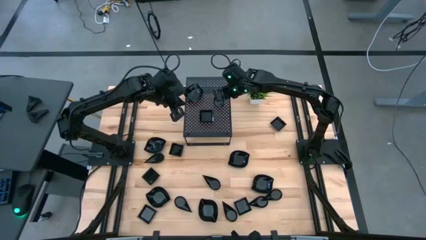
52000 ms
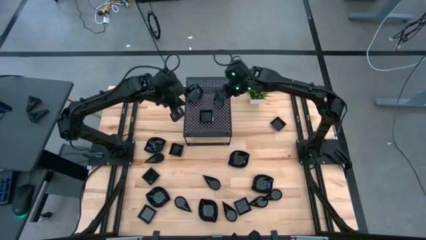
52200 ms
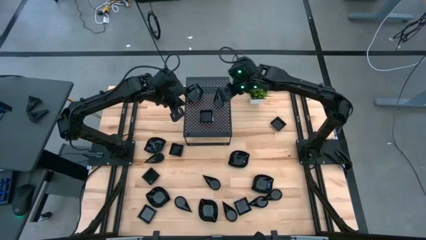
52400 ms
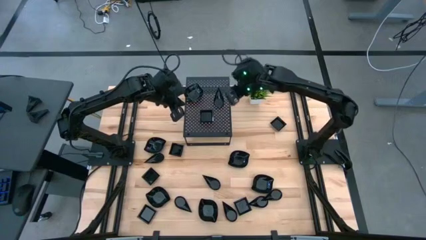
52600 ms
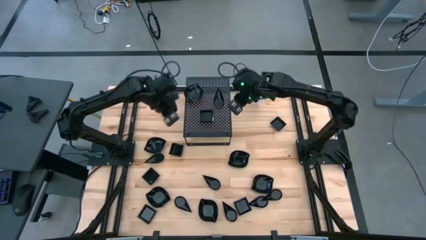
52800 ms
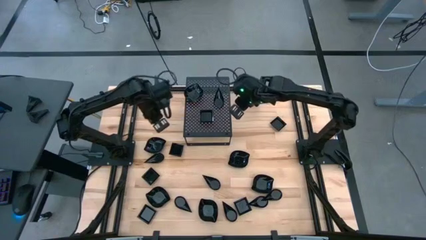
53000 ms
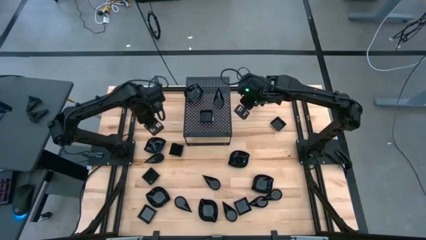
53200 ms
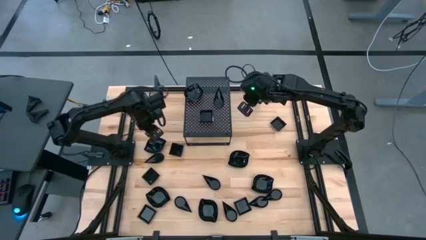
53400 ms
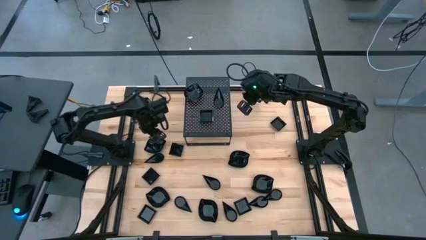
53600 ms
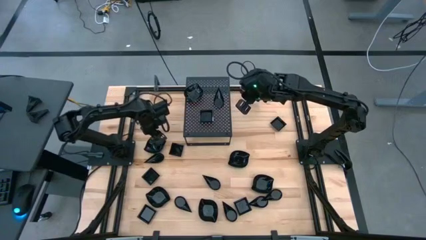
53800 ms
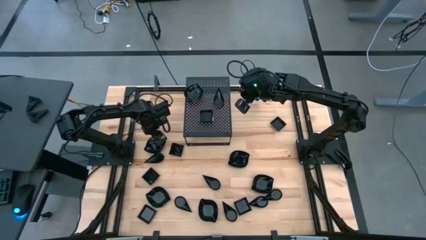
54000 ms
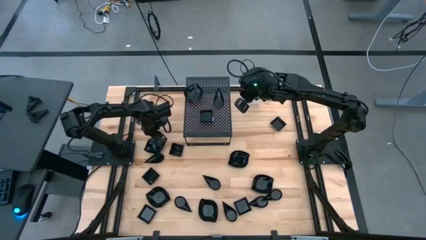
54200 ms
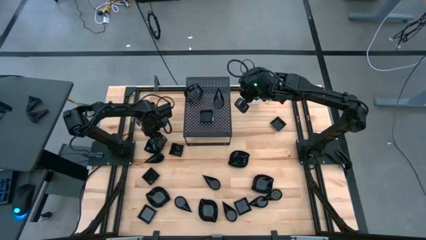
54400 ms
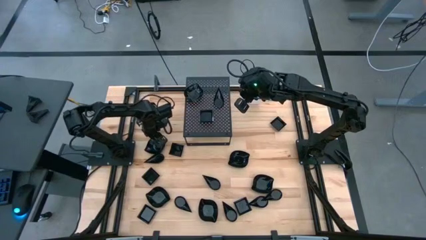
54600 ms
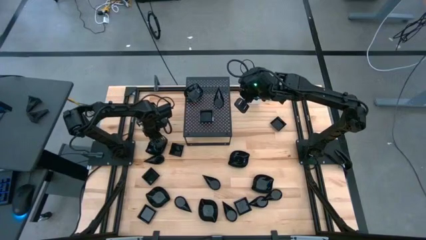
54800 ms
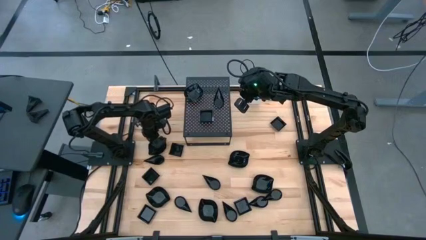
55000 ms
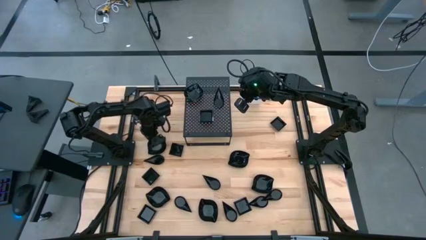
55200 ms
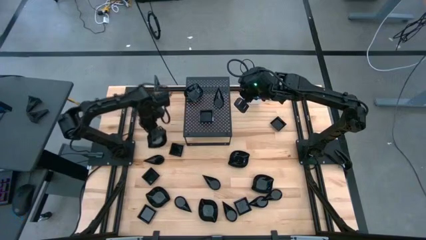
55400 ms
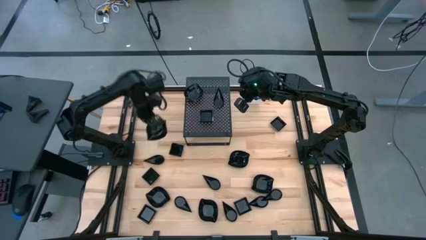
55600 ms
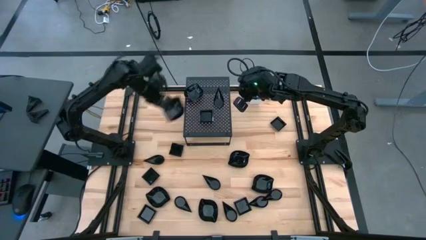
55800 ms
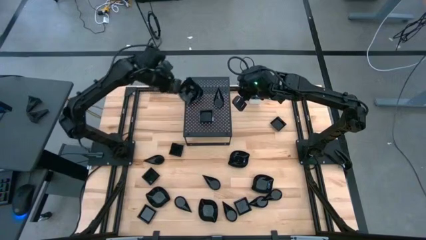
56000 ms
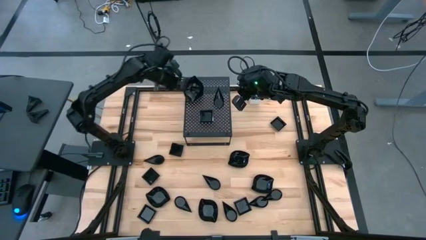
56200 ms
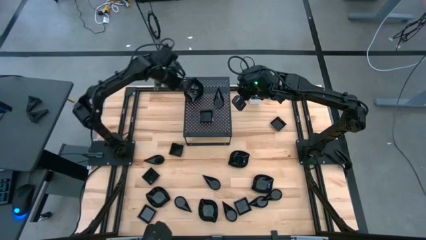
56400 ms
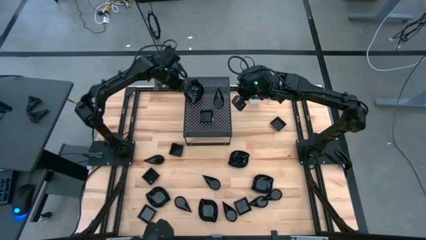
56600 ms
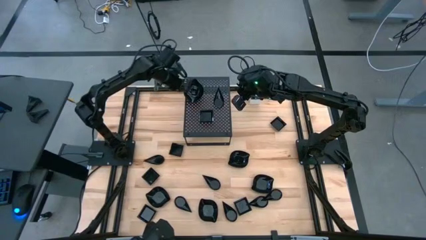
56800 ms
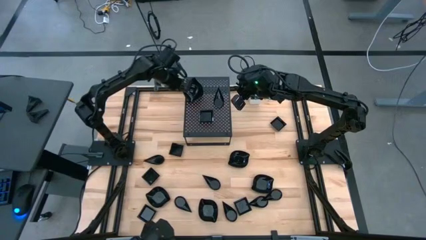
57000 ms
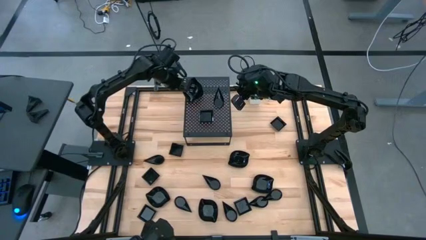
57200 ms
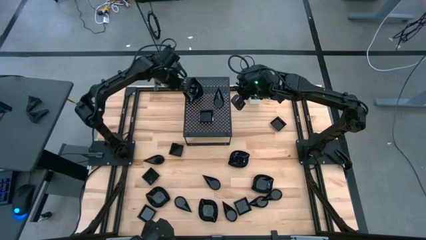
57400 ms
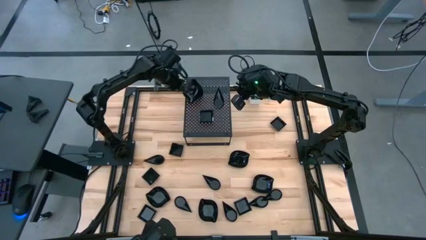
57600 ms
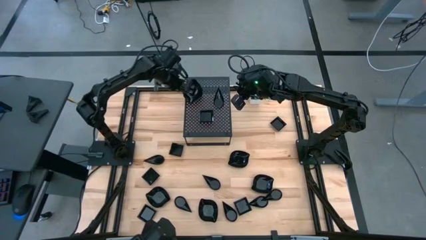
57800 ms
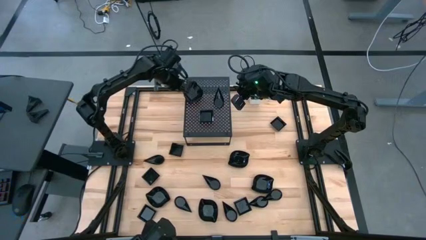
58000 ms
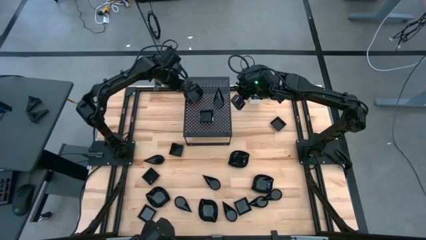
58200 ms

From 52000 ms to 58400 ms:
Task: Pick & Place Mini shaped plates
Stack the leaf shaped plate on top of the leaf shaped plate on the shelf

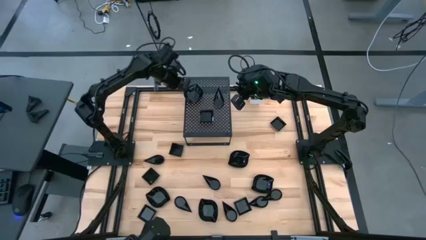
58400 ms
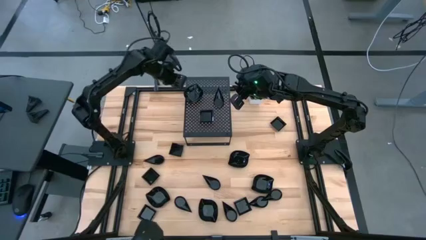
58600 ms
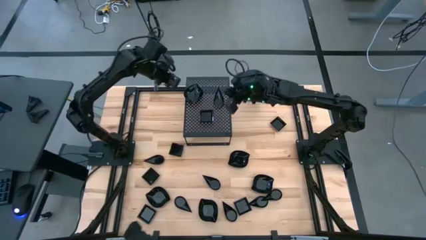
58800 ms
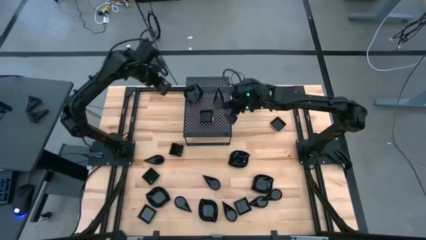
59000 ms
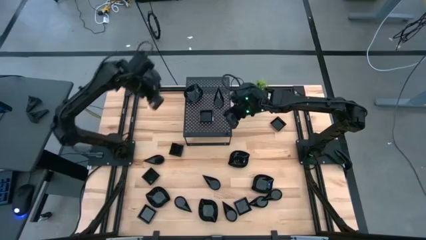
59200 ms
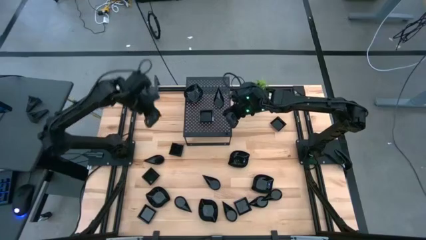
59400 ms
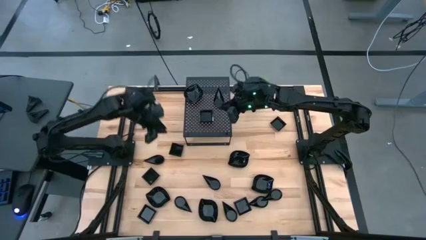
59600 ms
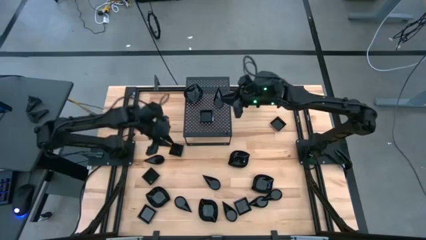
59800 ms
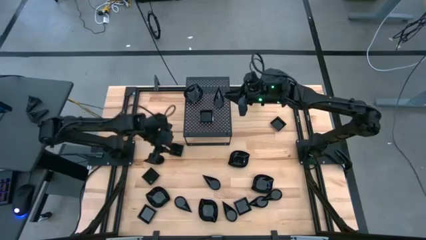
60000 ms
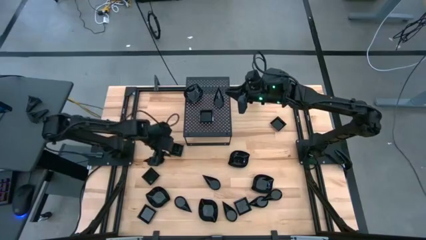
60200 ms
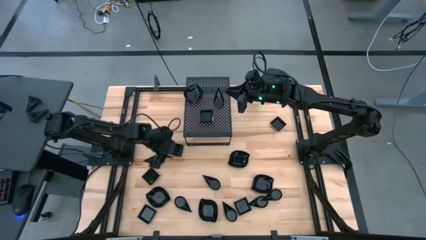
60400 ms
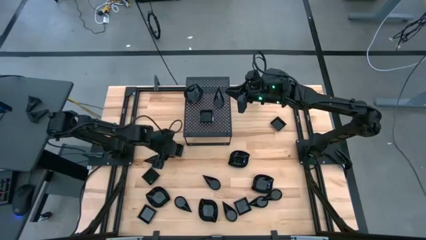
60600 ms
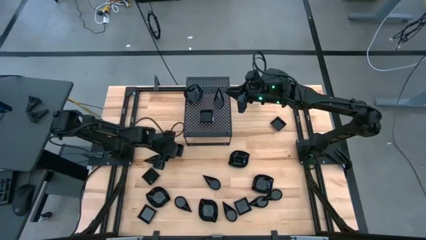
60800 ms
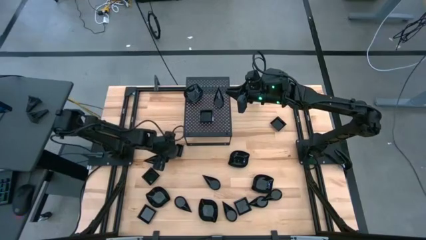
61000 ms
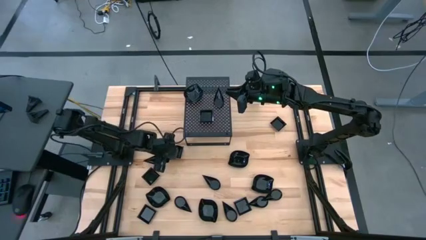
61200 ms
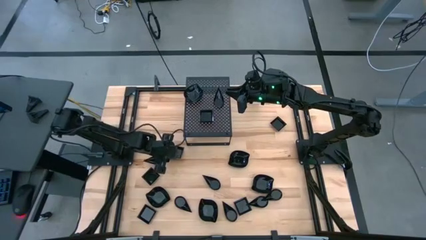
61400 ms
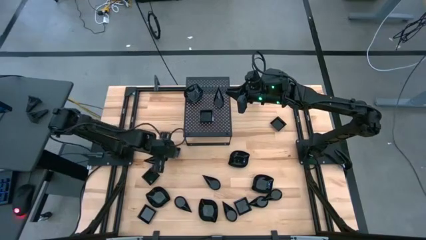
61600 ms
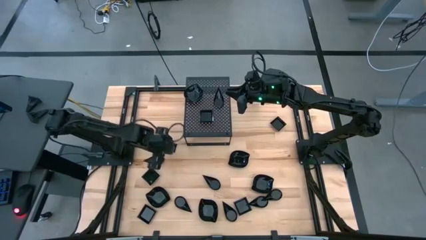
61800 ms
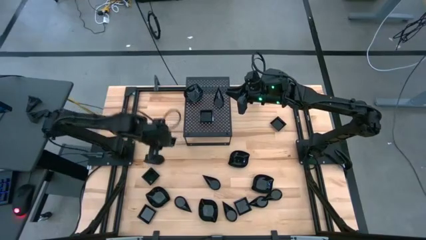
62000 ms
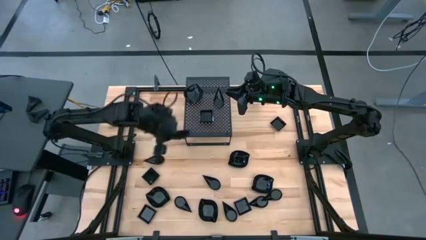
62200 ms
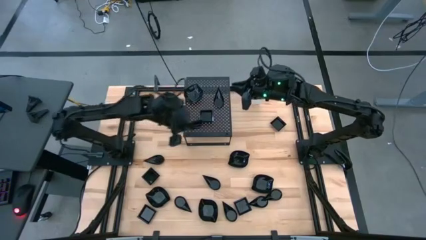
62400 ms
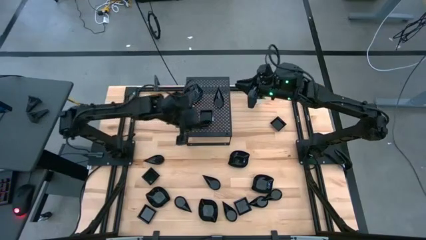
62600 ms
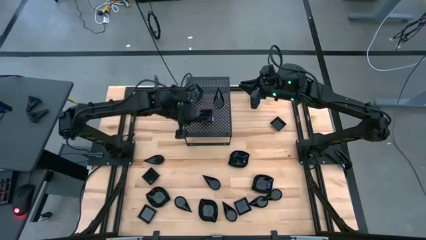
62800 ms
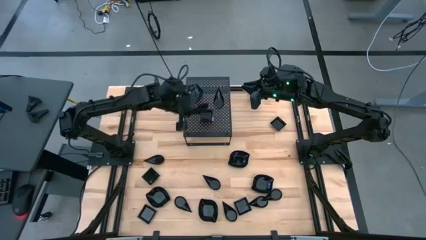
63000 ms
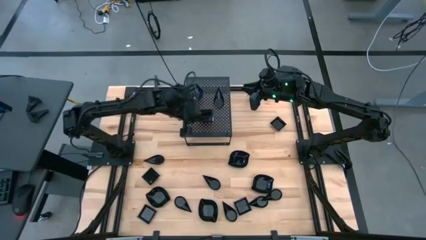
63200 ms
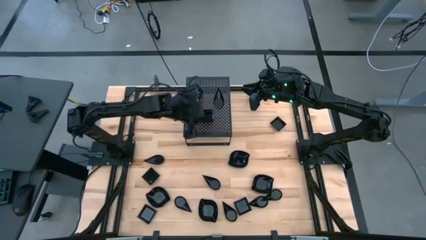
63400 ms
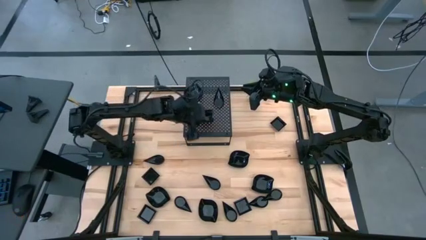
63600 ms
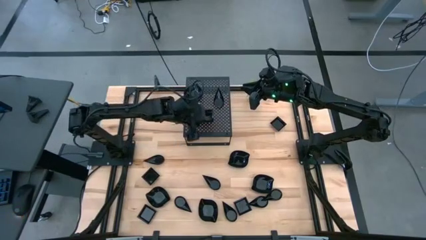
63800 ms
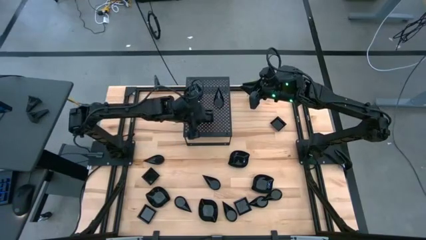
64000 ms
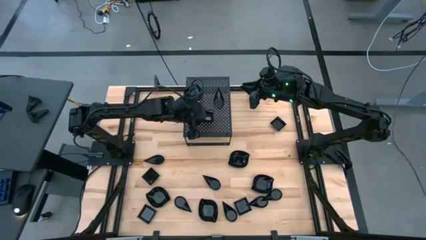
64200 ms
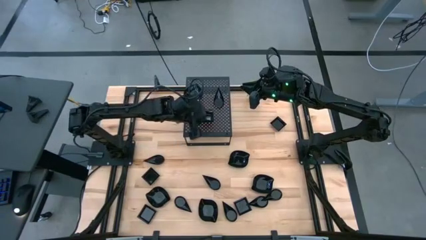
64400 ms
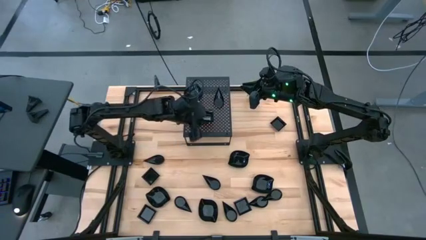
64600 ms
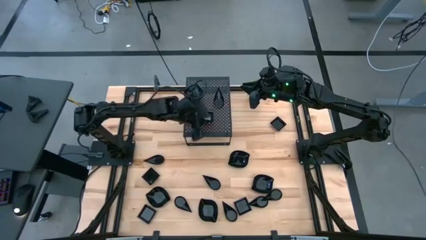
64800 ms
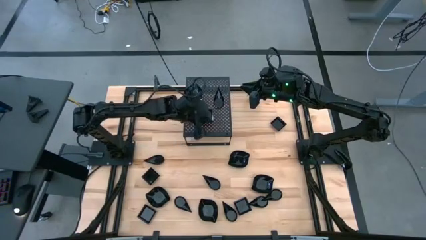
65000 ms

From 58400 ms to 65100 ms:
Stack the square plate on top of the other square plates on the shelf

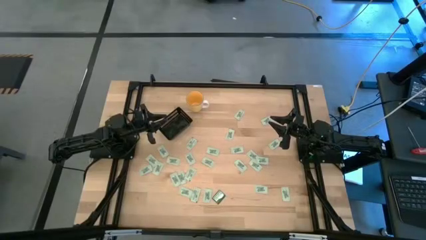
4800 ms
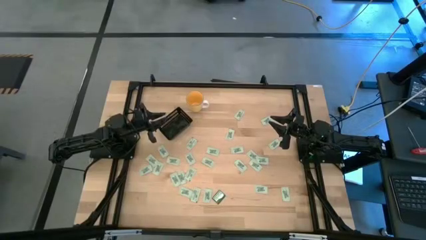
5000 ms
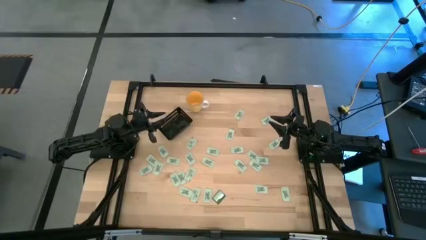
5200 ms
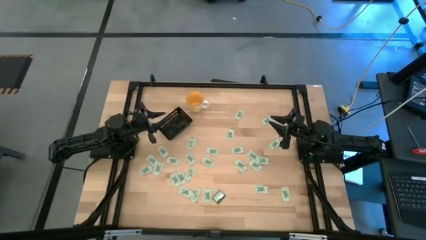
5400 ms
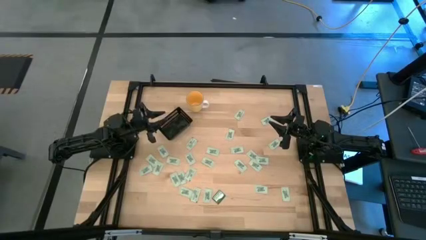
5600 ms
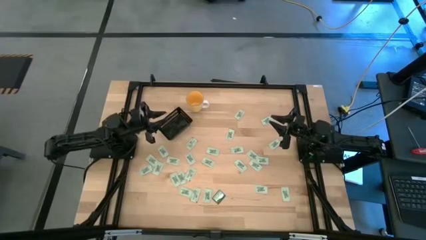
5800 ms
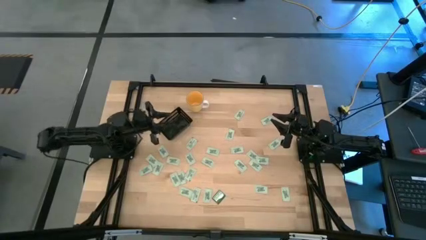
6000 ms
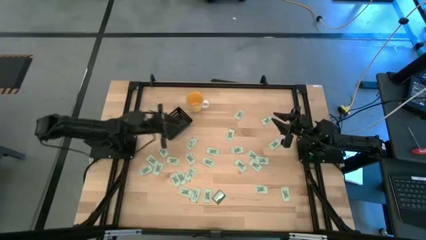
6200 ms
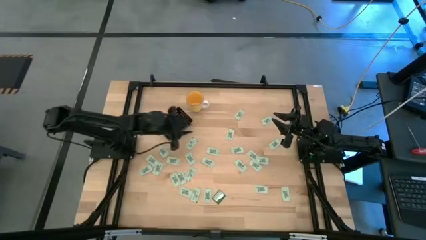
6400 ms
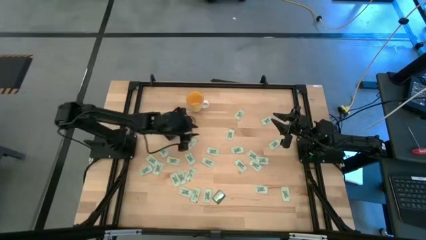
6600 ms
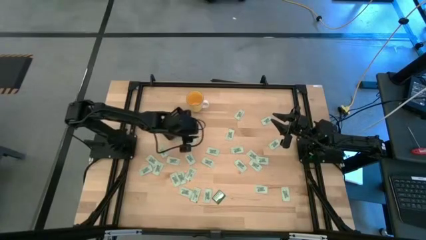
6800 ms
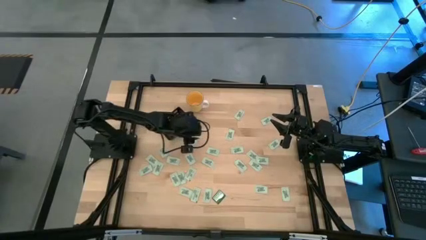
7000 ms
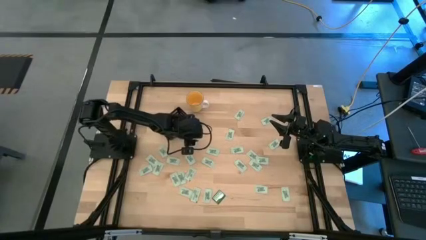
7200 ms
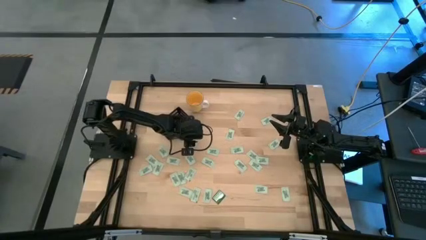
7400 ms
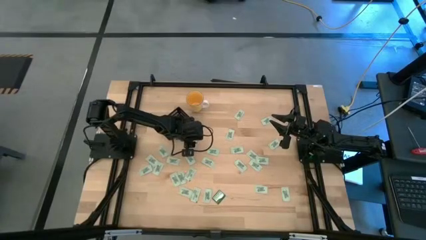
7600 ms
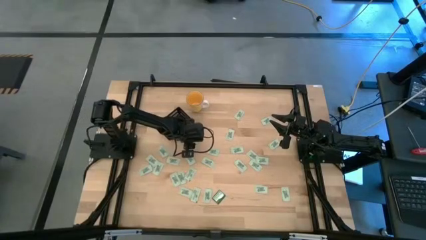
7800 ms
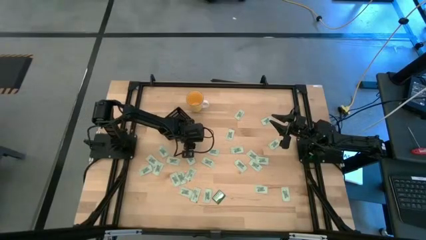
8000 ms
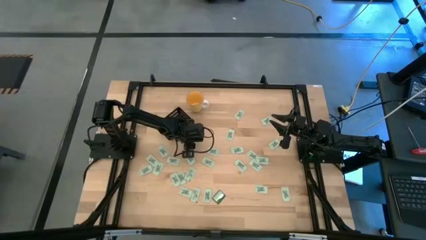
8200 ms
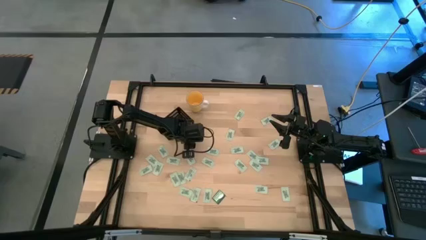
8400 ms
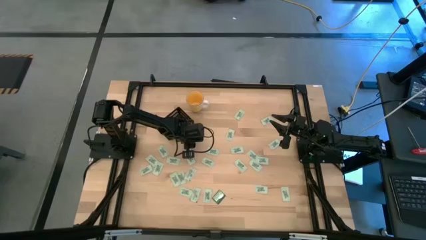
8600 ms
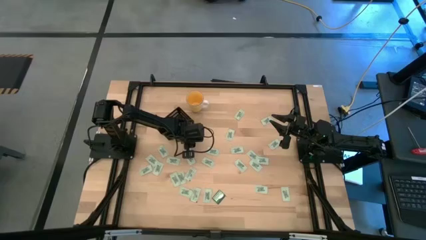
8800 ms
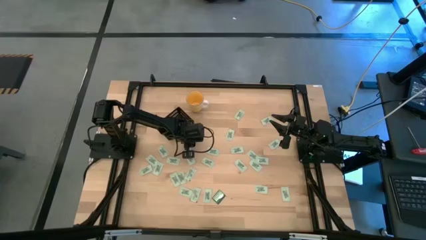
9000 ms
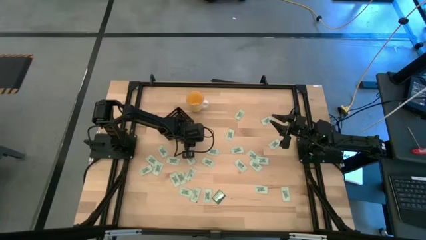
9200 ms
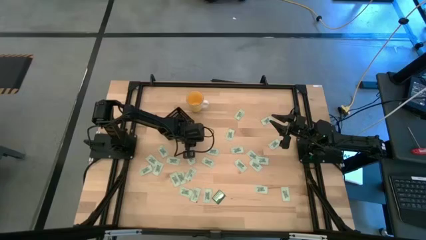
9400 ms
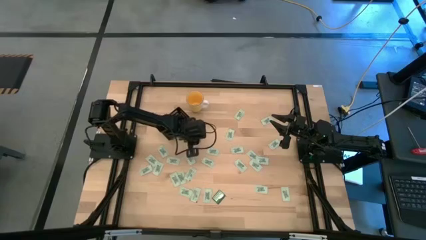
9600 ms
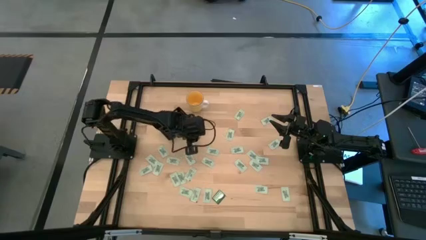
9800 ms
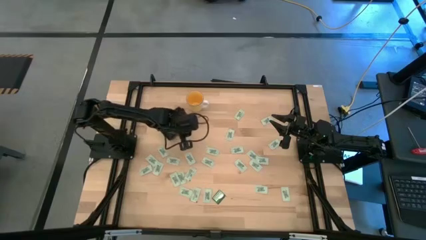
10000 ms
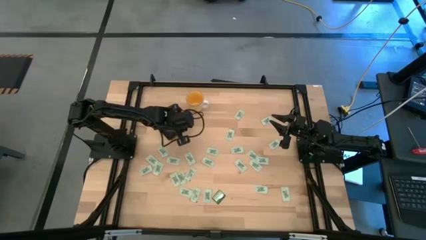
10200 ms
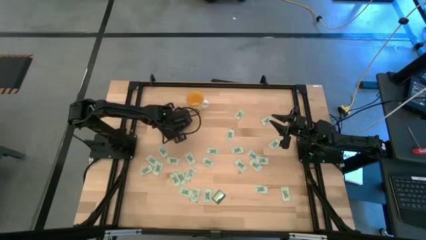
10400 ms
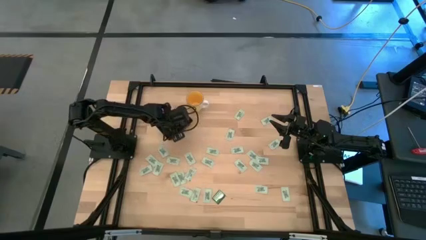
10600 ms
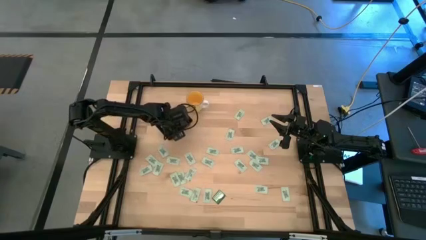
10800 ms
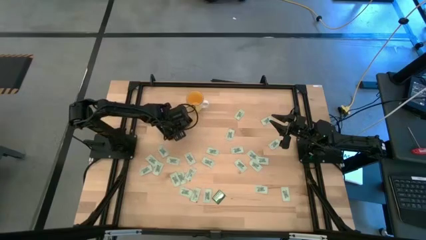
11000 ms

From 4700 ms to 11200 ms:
Task: Pick and place Stevia / Truvia into bins
Put the green stevia packet into the black bin
